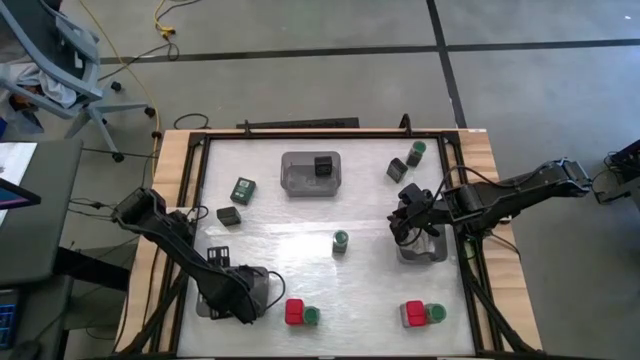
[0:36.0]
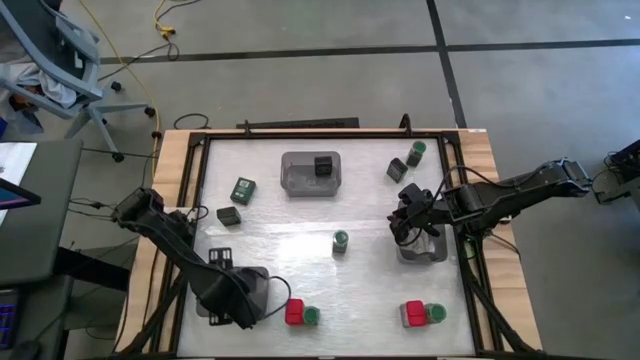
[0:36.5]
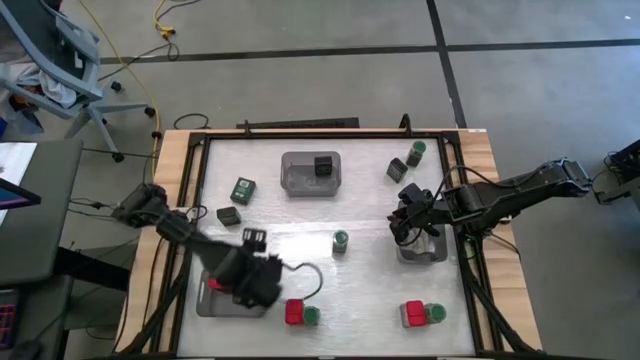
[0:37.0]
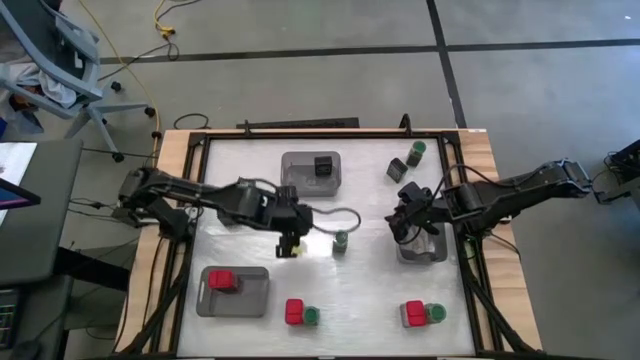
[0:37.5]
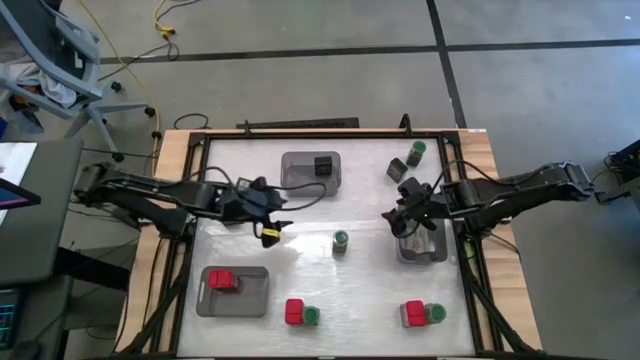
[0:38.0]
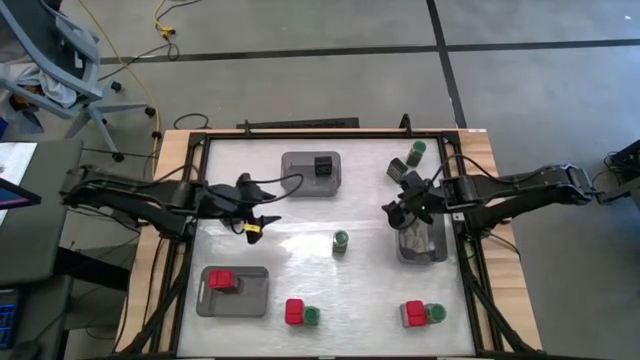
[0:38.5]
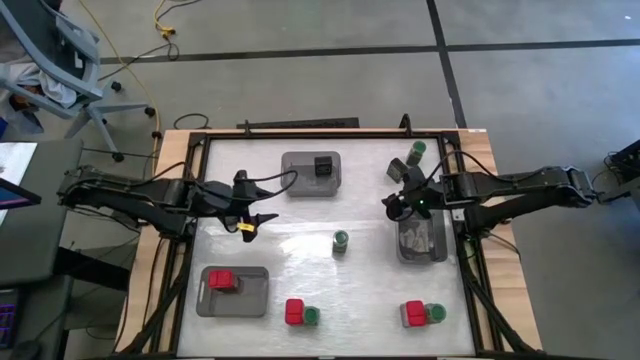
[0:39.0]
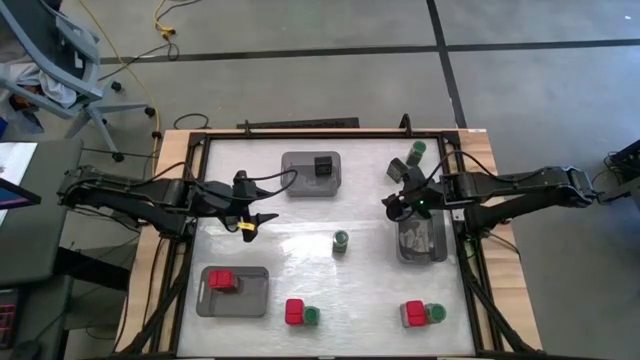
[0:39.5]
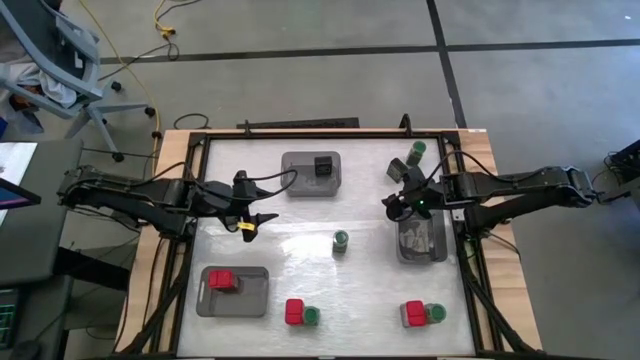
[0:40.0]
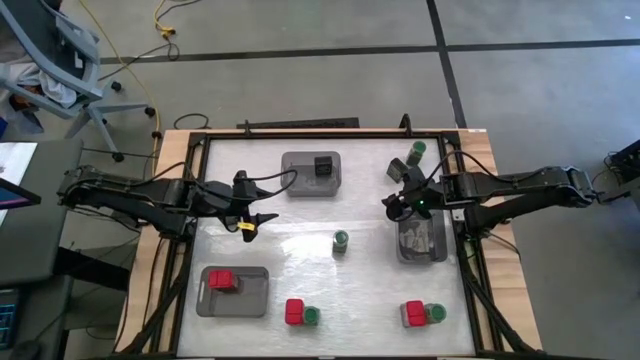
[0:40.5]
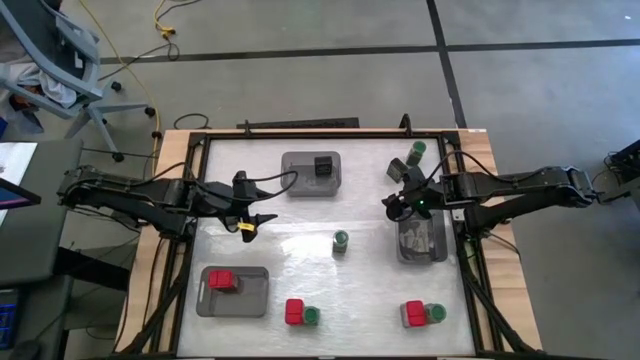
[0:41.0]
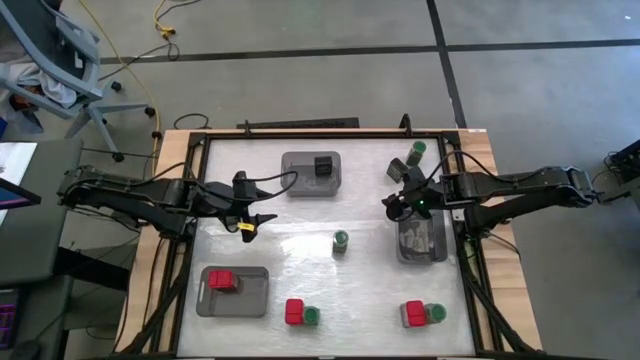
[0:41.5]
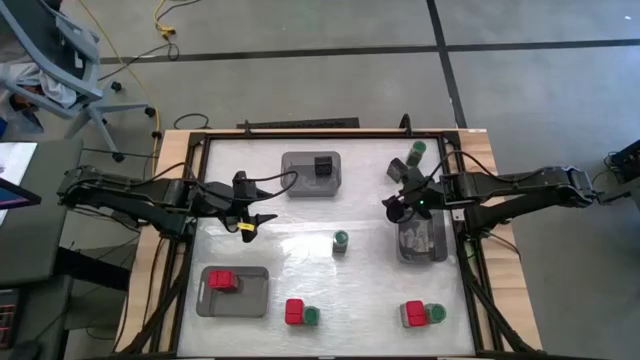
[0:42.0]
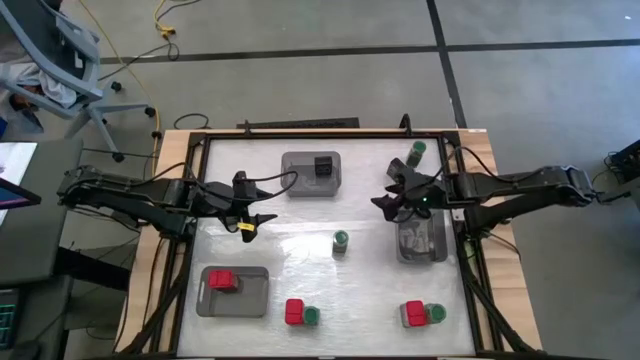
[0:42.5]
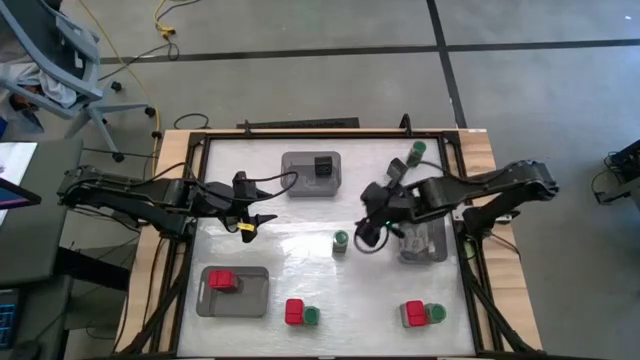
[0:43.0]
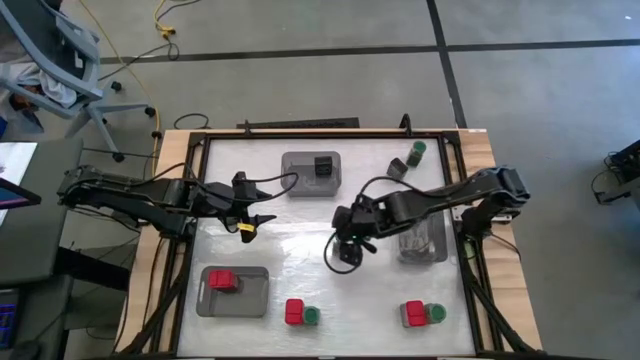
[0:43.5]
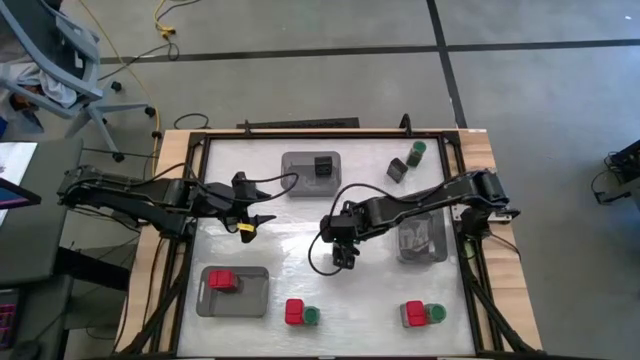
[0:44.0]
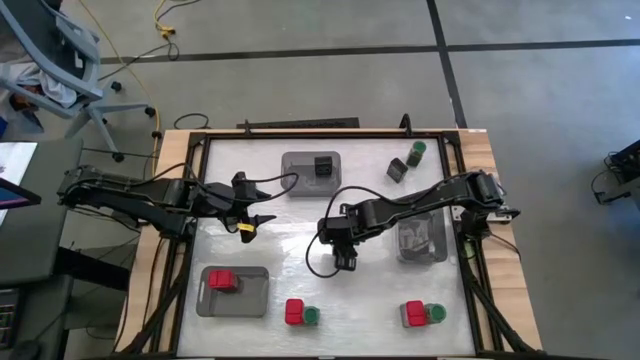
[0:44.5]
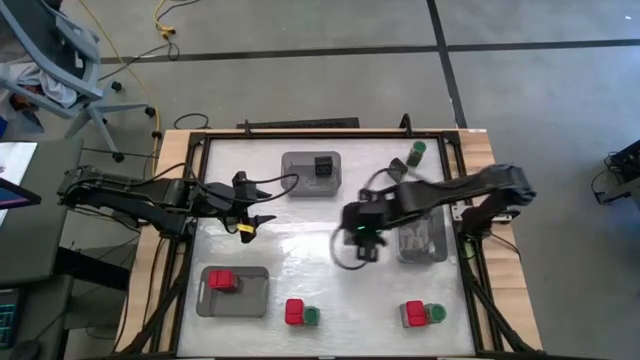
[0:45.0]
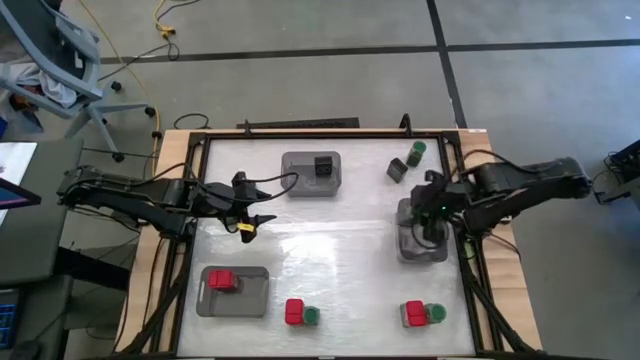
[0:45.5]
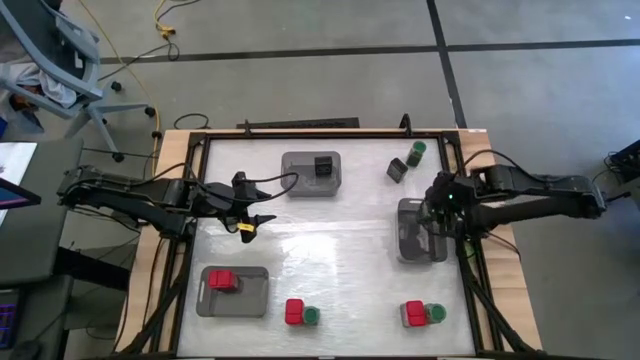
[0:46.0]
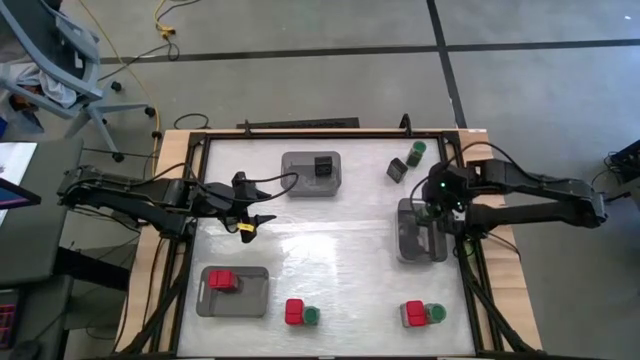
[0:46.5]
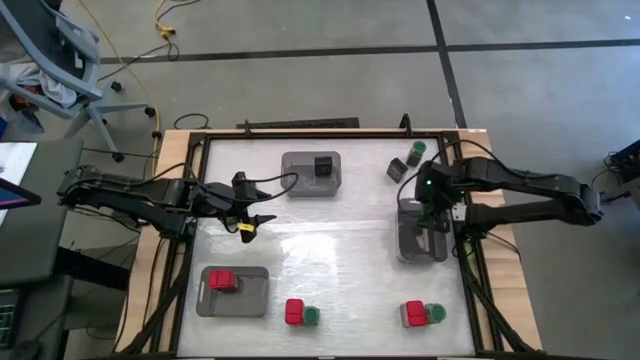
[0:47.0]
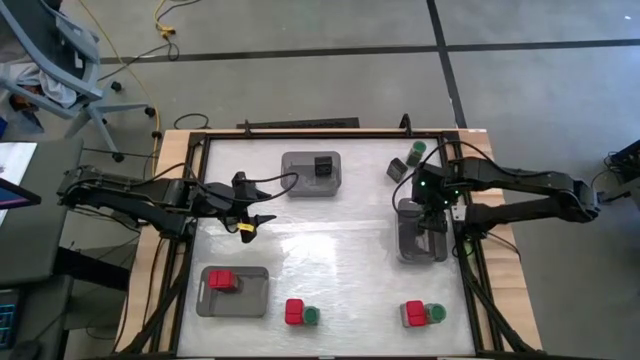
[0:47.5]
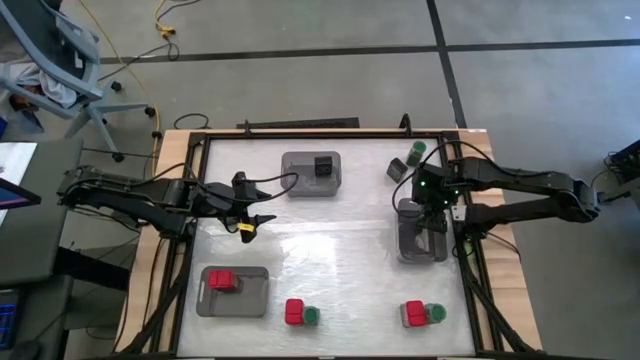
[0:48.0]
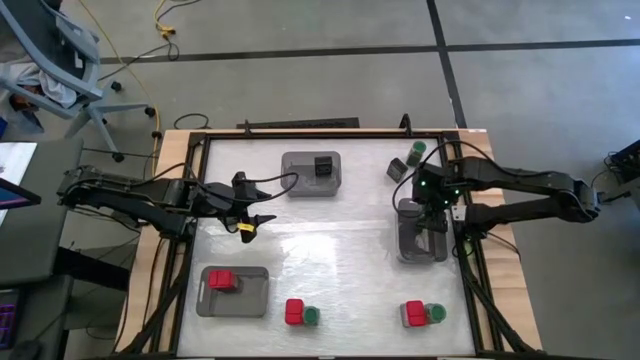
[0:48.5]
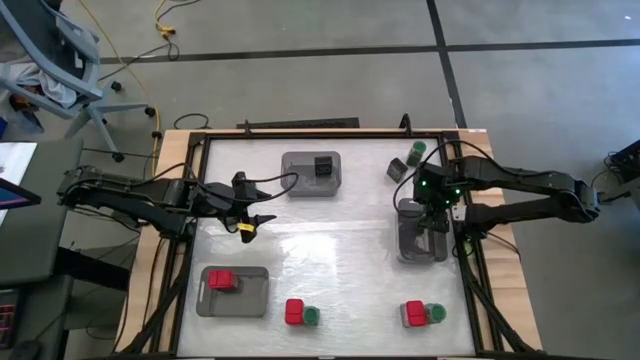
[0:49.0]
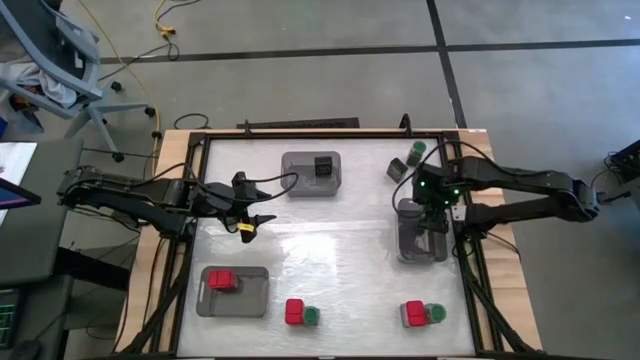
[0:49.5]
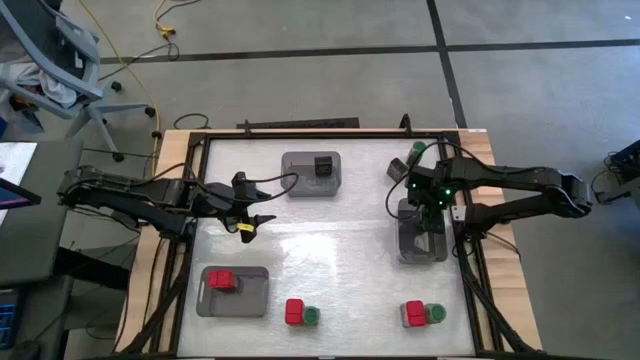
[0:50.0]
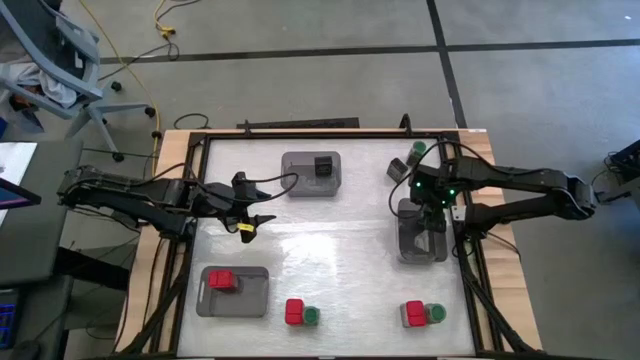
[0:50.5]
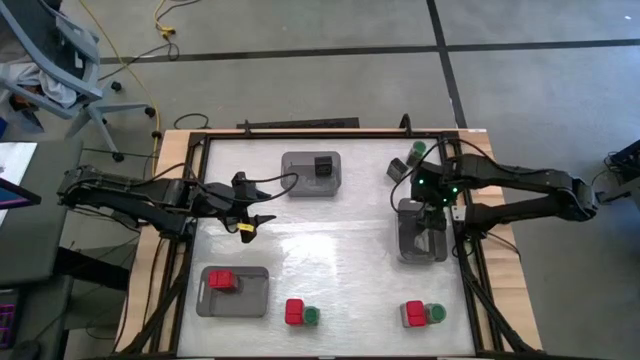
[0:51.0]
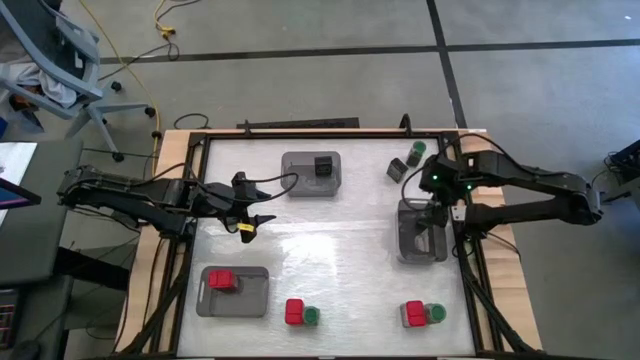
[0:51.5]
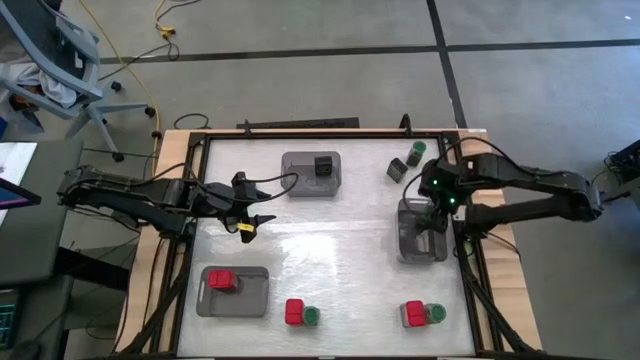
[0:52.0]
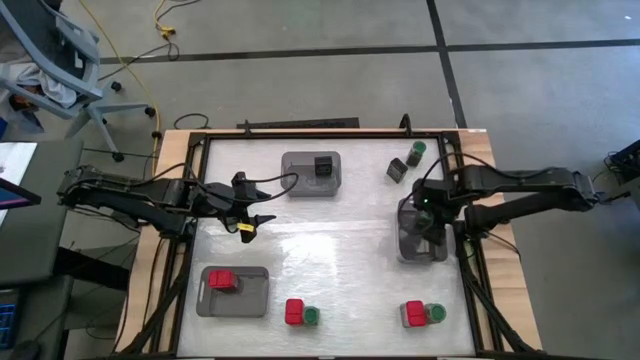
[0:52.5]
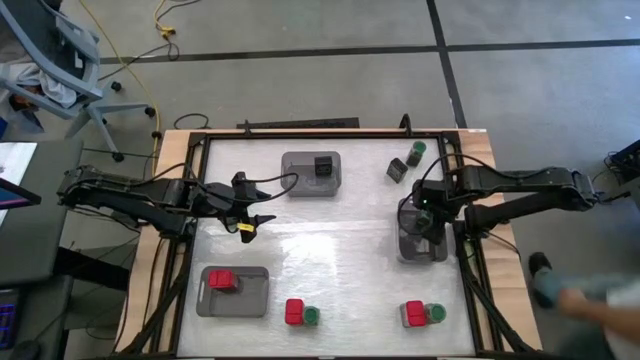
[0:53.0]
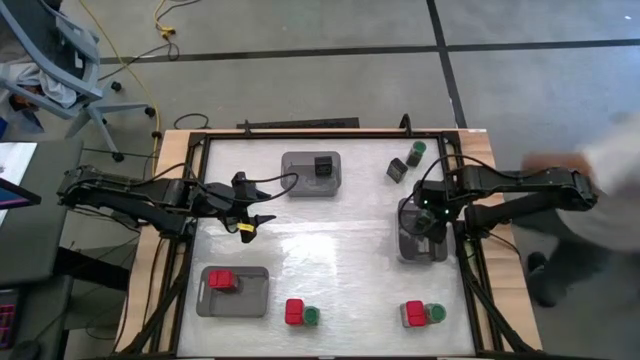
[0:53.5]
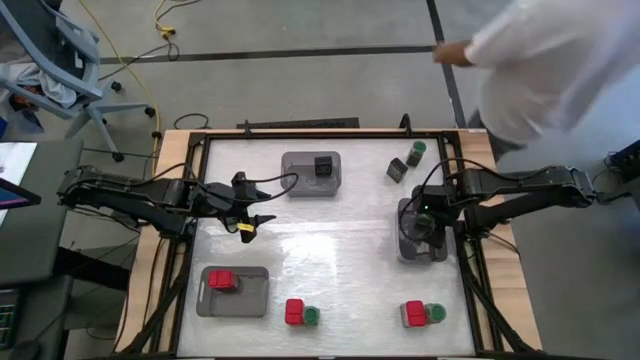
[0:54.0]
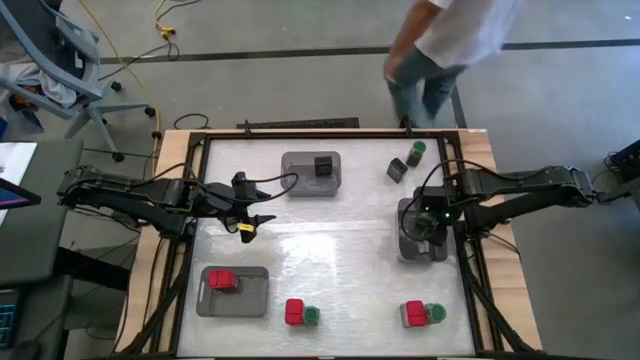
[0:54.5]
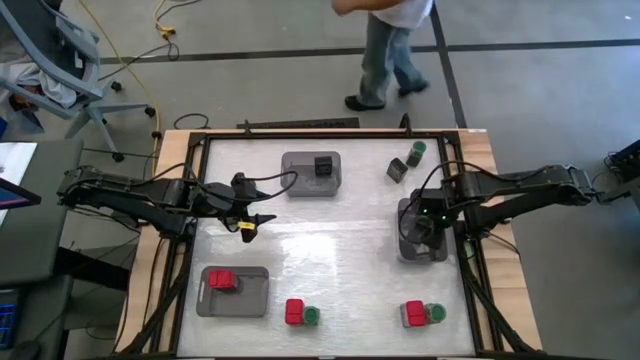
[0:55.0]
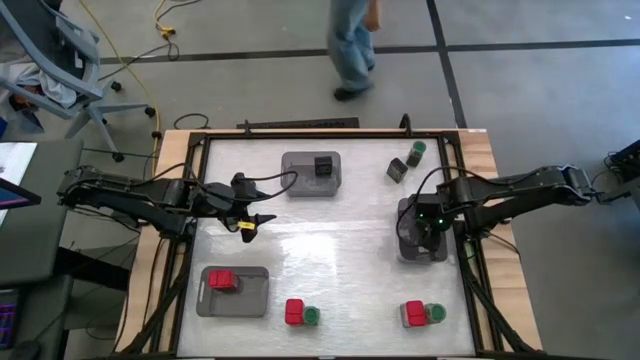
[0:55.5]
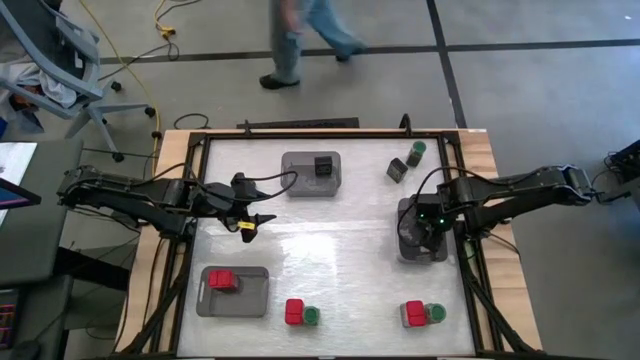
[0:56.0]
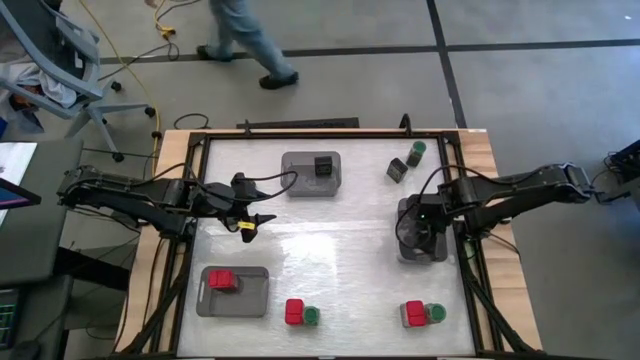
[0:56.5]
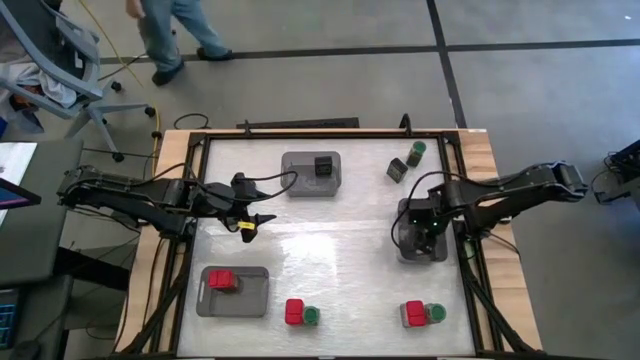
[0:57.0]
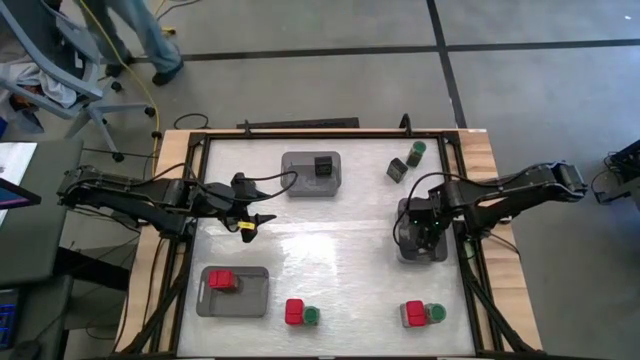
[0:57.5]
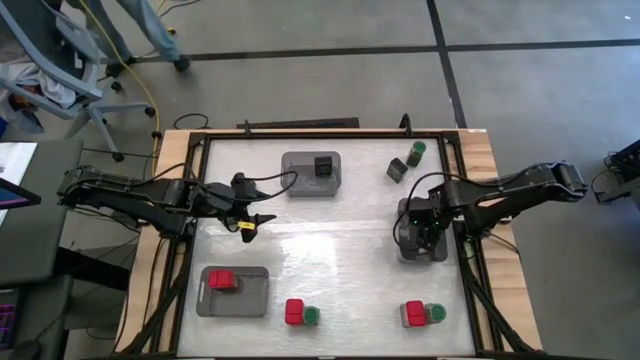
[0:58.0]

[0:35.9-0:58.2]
Task: Sort spices by type
Put the middle green seasoning bottle into the middle right black transparent bin

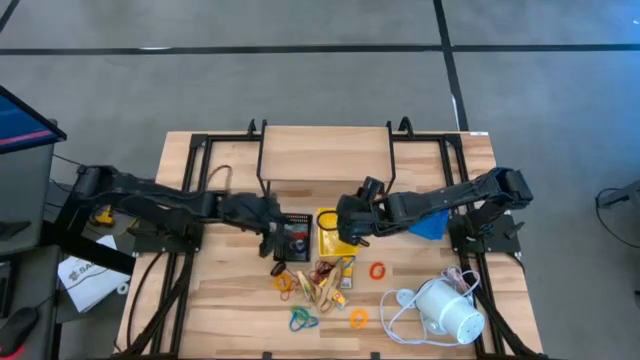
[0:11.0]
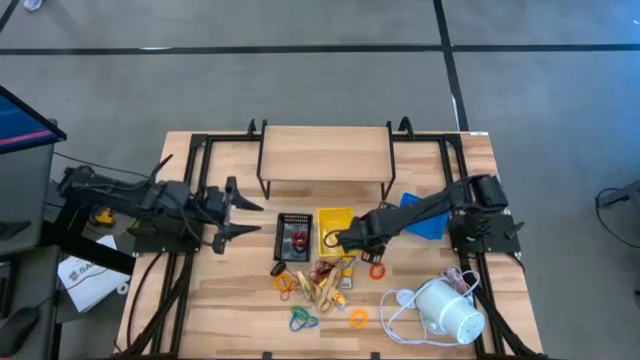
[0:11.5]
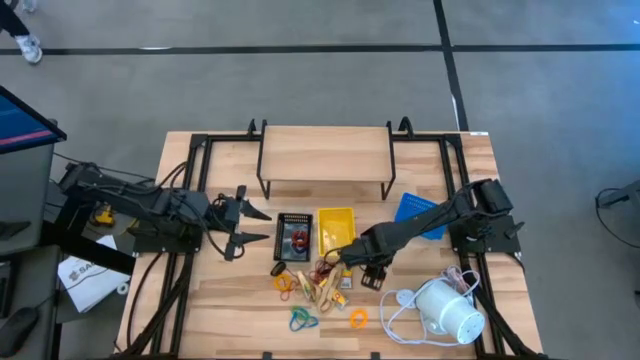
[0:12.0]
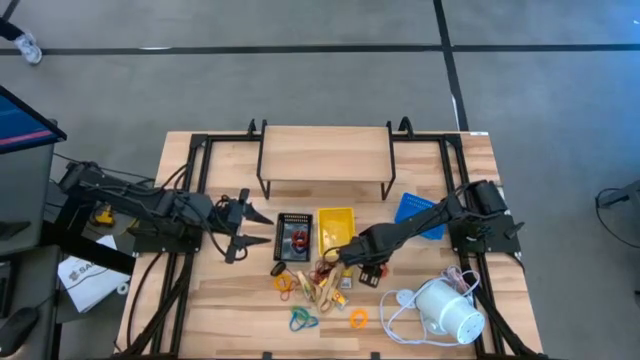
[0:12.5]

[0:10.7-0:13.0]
Task: Pick & Place Office Desk Supplies
Put the orange spring keychain into the black bin
